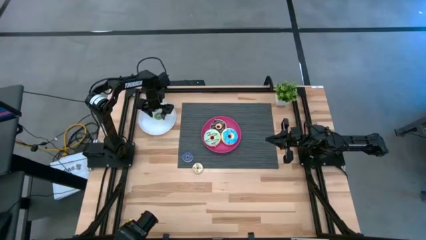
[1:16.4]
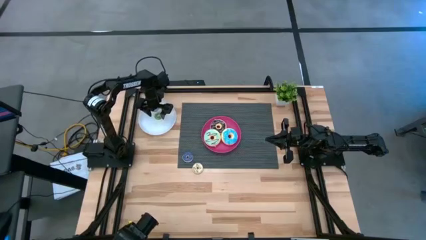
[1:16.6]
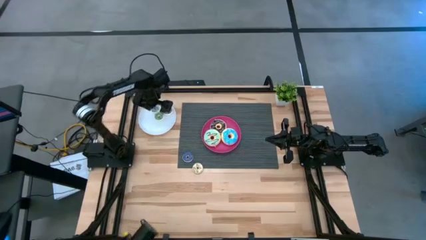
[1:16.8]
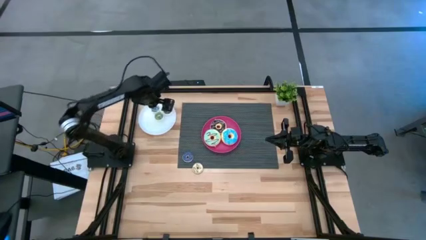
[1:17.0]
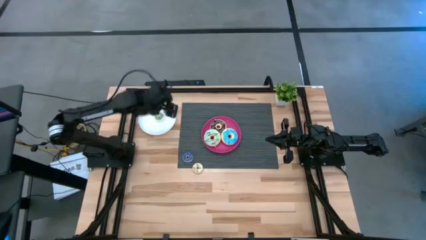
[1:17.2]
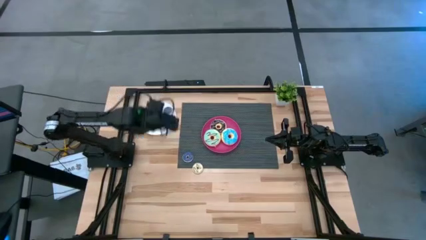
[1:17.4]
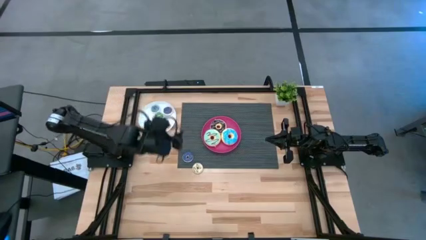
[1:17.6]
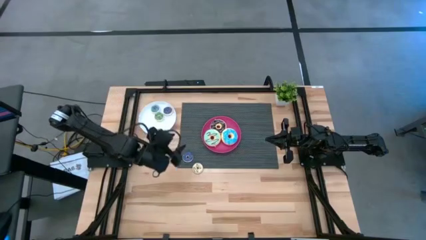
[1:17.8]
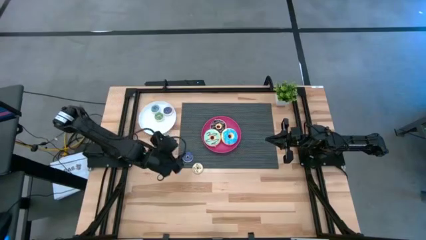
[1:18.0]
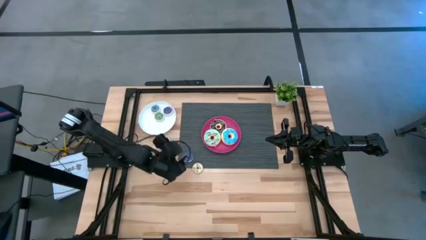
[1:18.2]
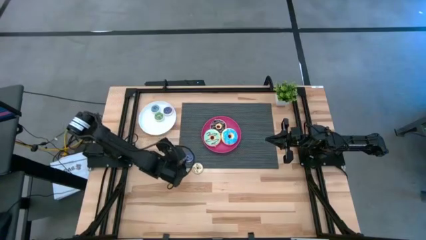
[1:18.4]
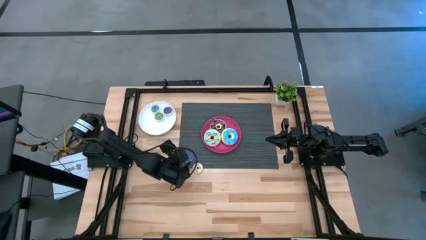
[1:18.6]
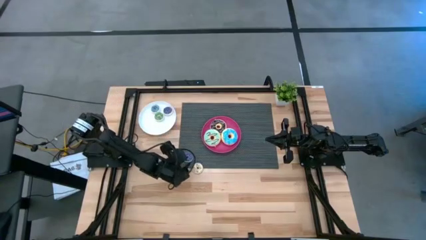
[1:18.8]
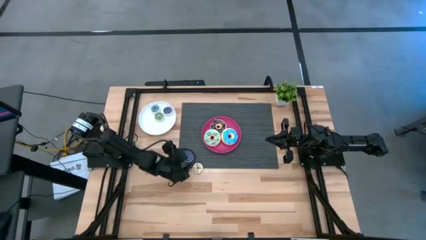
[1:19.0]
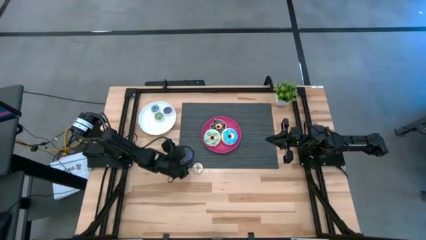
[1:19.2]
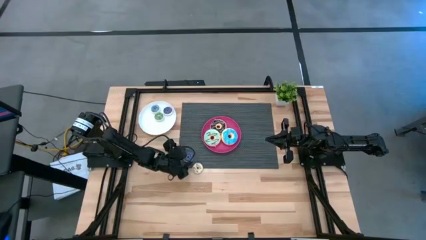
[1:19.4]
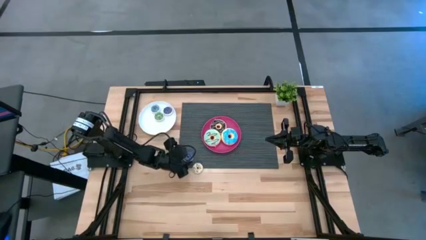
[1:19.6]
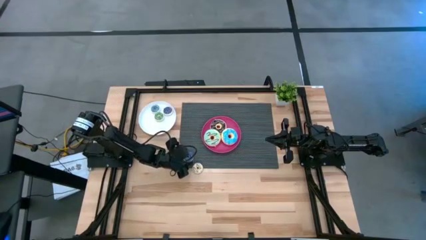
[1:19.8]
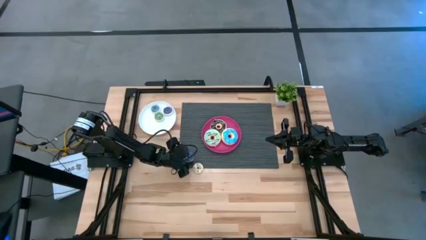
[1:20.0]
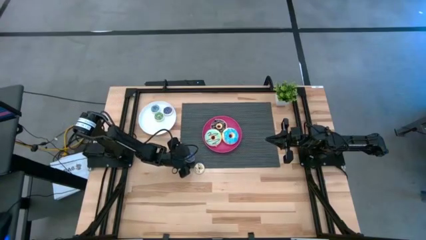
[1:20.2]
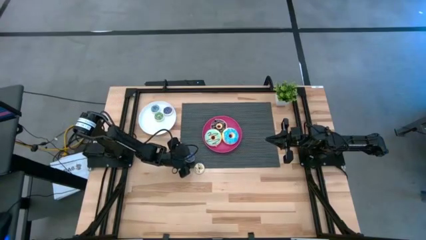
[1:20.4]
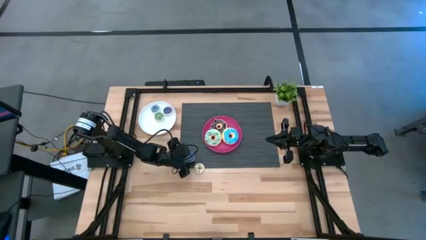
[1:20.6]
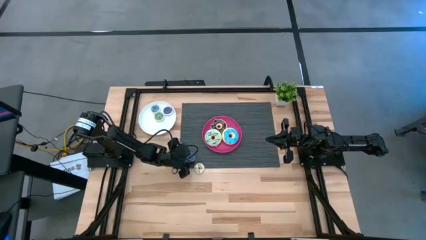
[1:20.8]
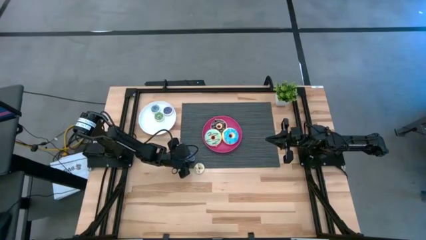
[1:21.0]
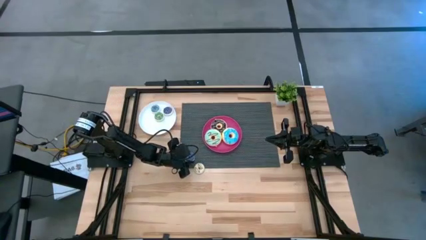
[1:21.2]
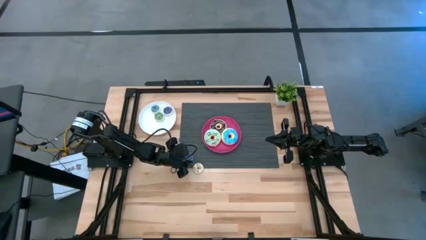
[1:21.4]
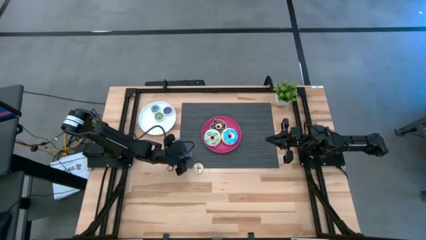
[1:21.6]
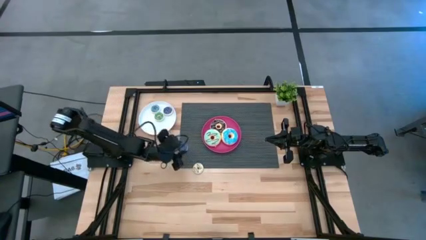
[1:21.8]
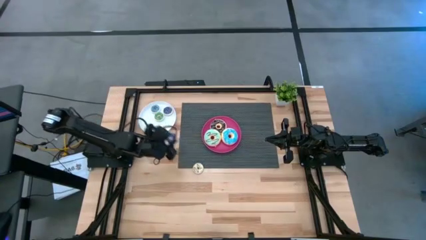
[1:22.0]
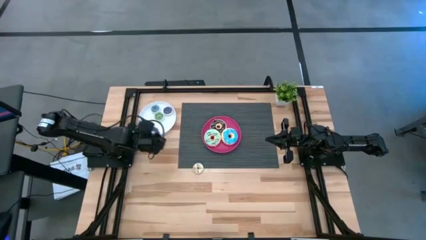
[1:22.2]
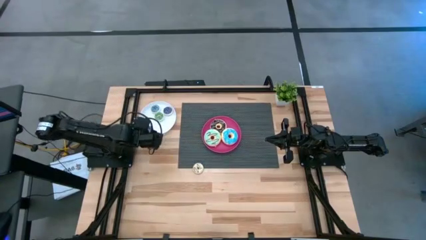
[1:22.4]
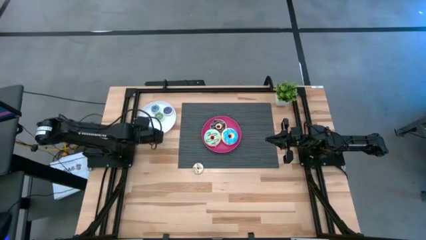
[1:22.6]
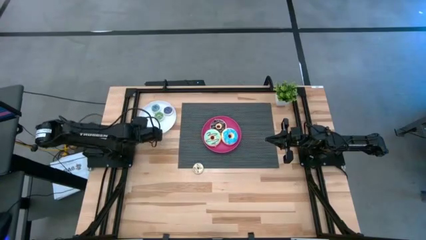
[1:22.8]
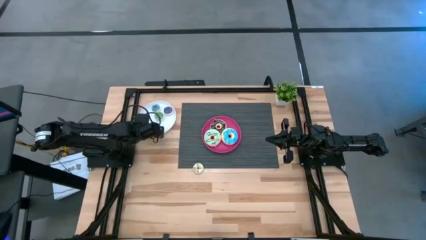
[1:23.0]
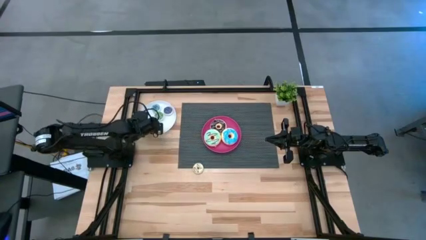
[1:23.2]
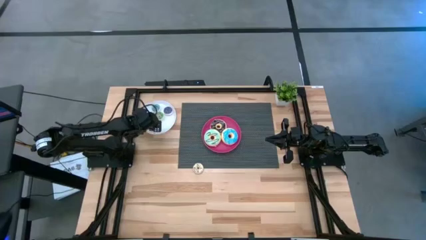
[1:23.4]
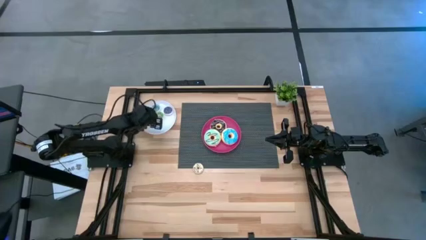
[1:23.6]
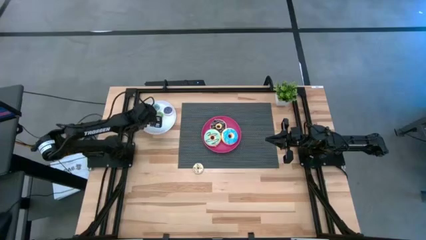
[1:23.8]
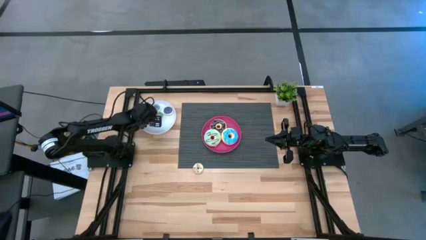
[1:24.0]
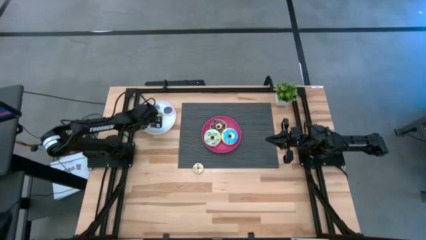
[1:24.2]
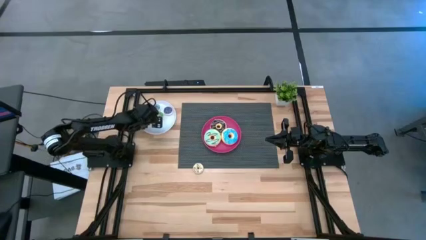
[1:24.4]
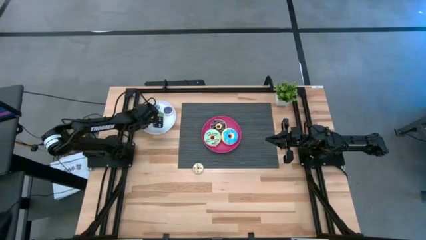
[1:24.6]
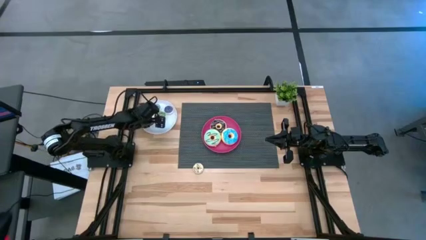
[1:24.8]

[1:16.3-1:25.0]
Task: Pick & Place donuts
Put the small violet donut on the white plate

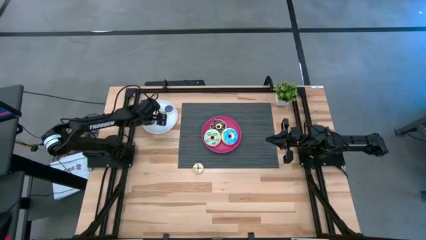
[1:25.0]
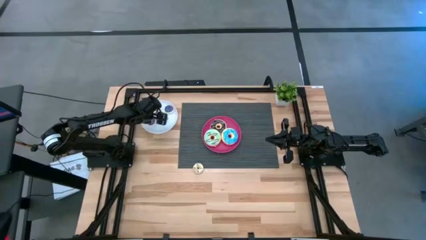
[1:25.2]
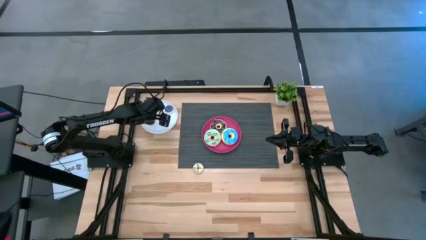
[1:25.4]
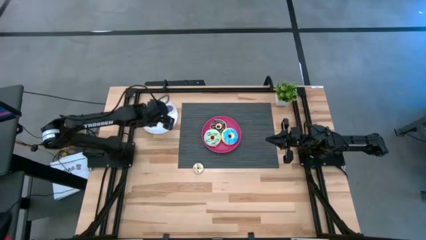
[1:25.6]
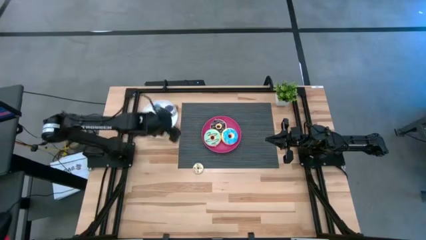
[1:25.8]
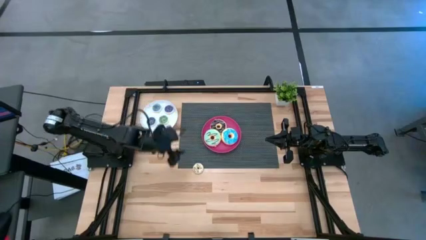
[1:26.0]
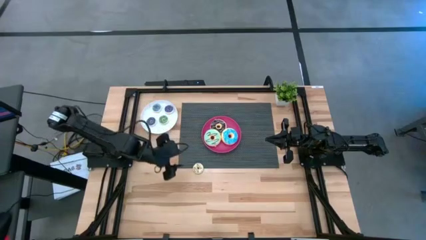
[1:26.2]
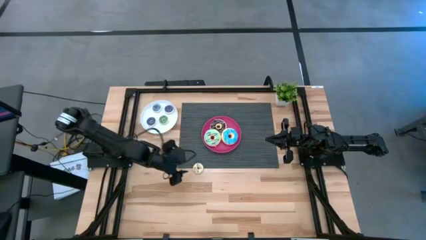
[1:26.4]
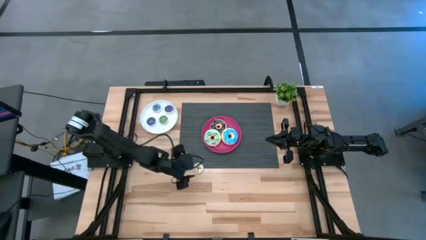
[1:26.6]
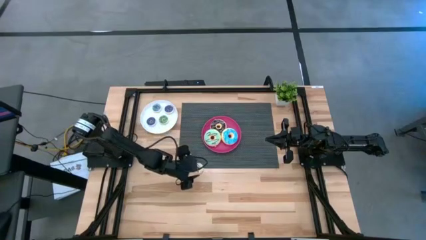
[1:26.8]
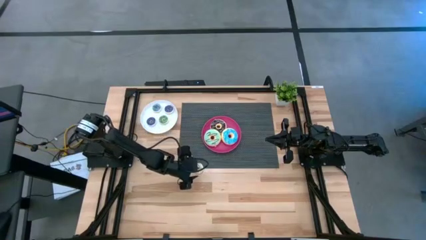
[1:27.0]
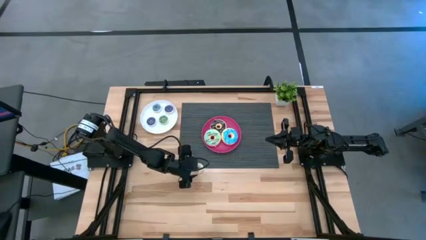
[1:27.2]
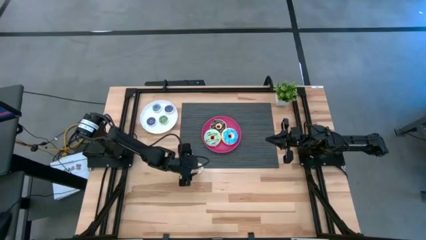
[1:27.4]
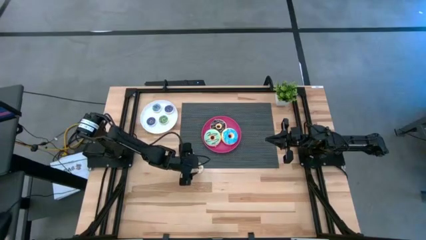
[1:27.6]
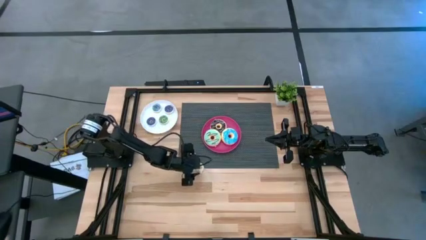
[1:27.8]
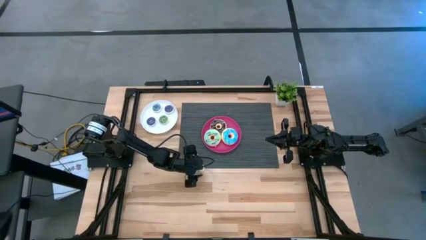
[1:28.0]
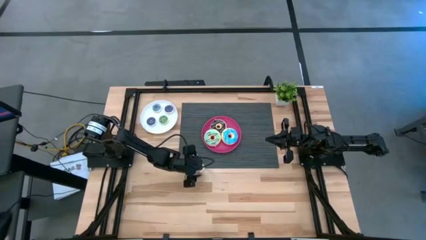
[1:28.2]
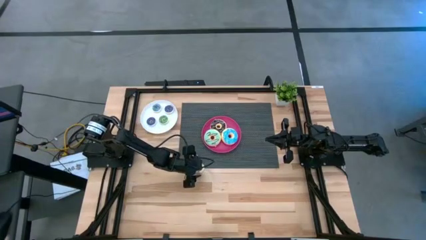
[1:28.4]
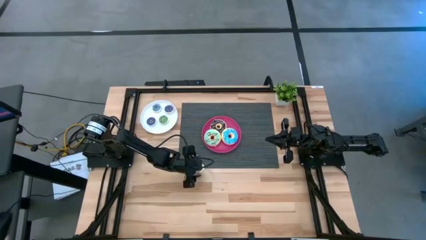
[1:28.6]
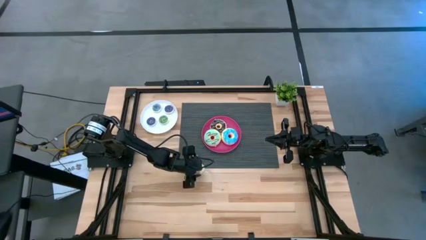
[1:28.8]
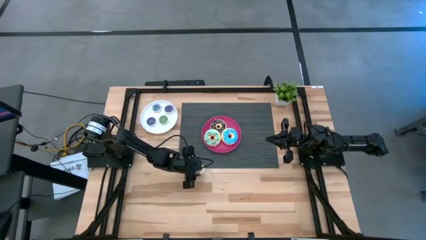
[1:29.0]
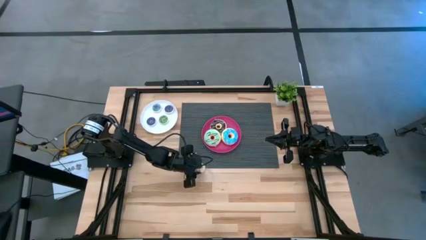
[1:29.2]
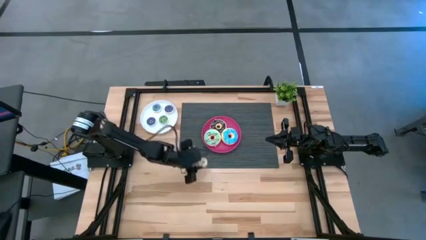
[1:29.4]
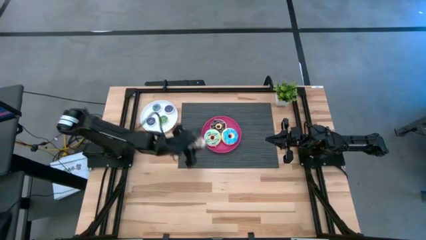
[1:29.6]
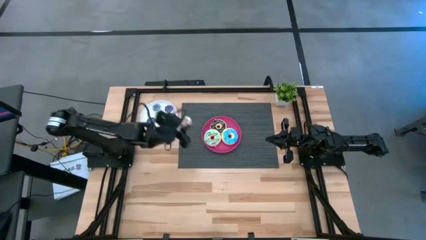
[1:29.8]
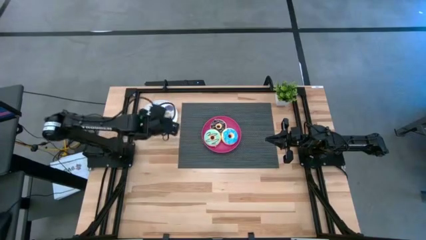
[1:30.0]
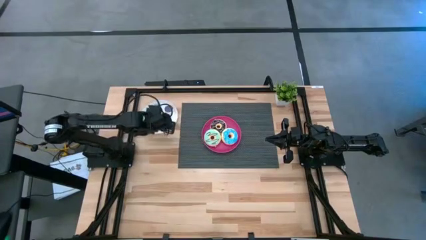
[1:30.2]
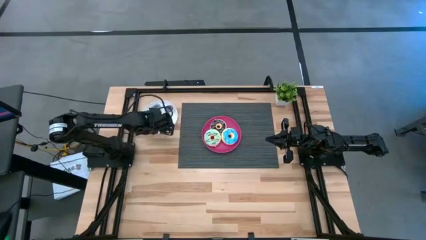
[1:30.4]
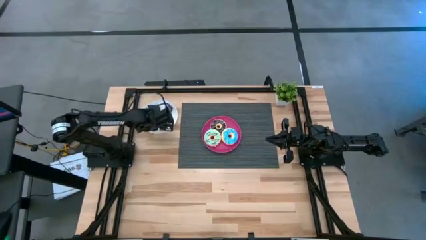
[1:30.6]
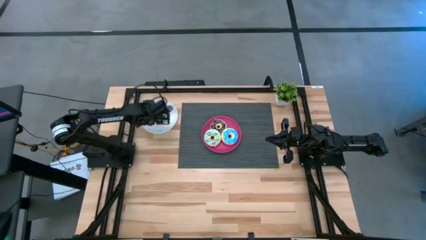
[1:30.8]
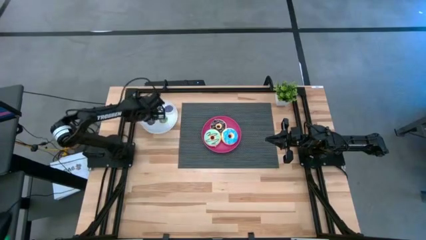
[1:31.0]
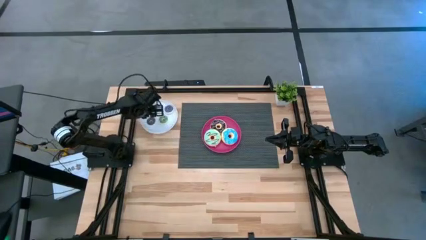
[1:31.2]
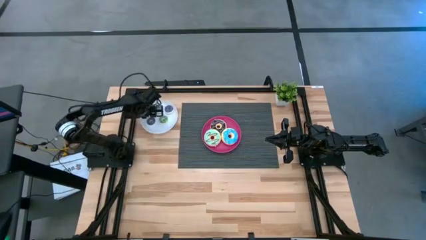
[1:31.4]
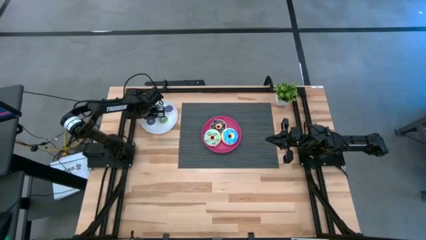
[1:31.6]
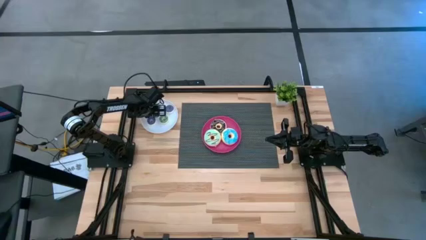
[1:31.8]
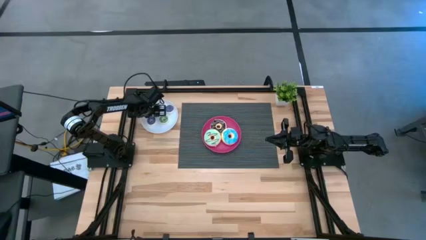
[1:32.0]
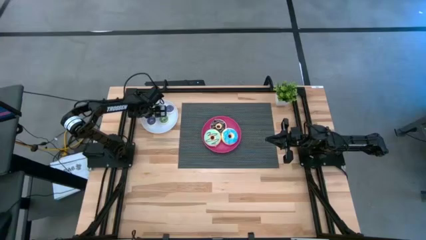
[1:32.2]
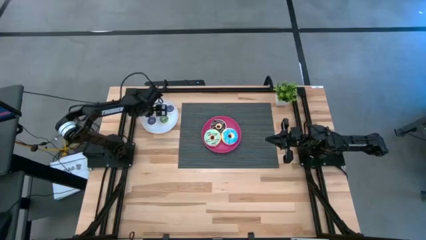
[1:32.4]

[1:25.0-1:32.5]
Put the small white donut on the white plate
